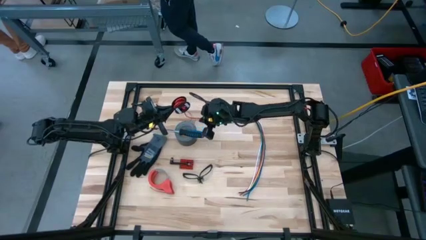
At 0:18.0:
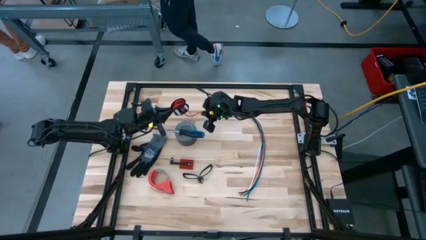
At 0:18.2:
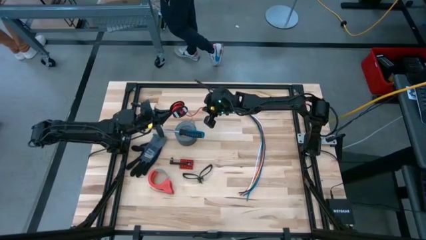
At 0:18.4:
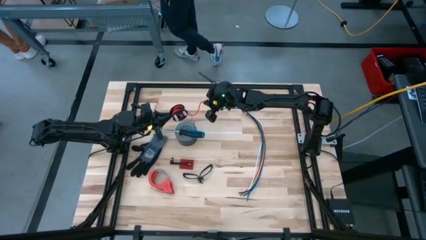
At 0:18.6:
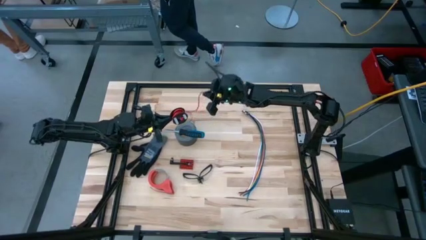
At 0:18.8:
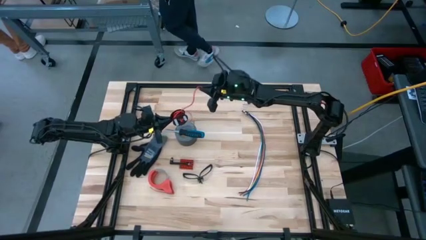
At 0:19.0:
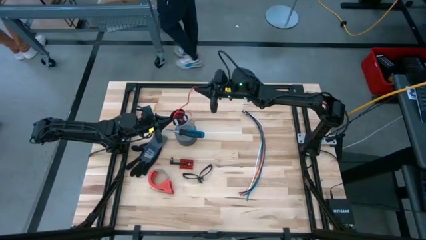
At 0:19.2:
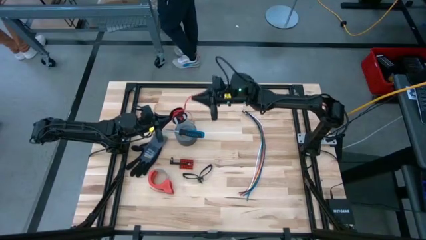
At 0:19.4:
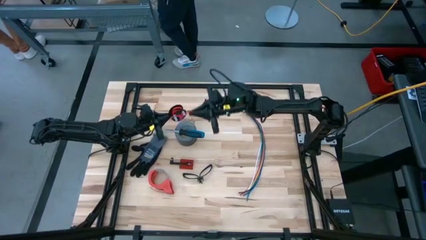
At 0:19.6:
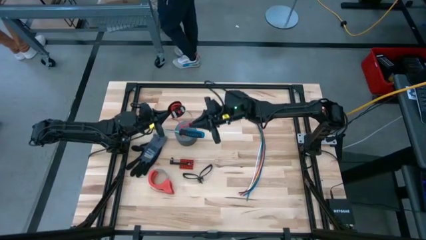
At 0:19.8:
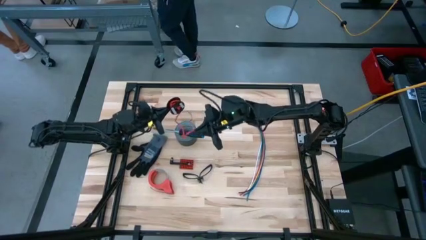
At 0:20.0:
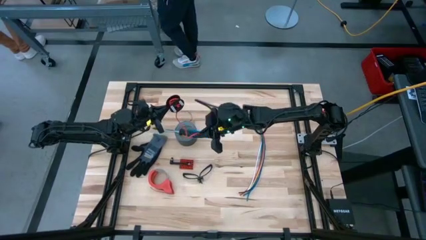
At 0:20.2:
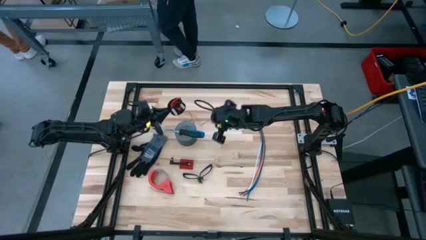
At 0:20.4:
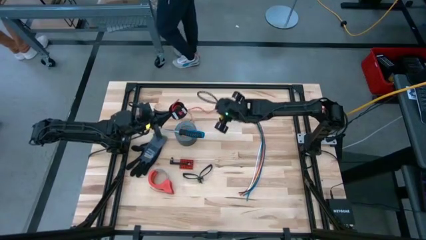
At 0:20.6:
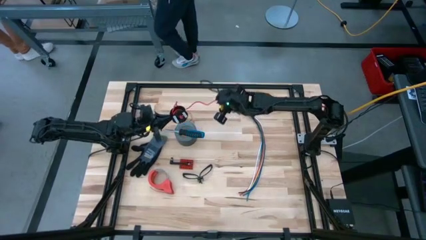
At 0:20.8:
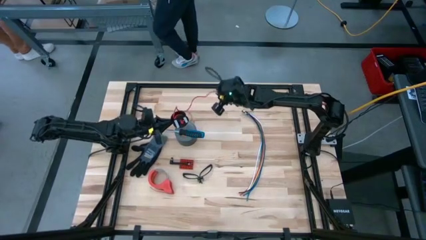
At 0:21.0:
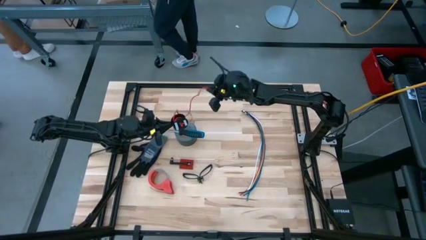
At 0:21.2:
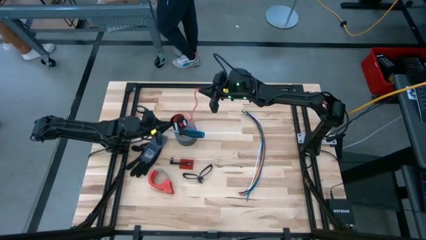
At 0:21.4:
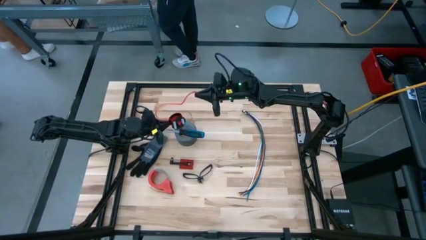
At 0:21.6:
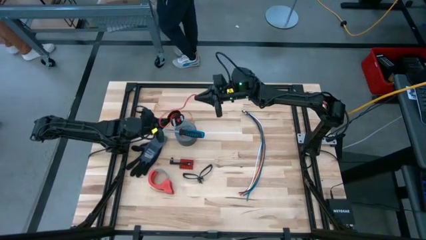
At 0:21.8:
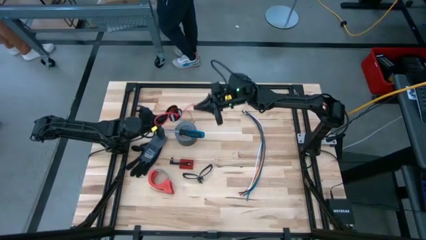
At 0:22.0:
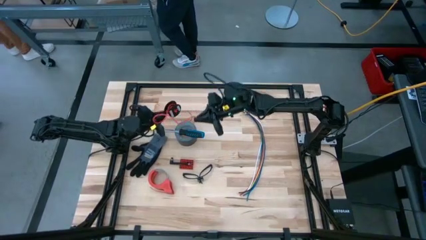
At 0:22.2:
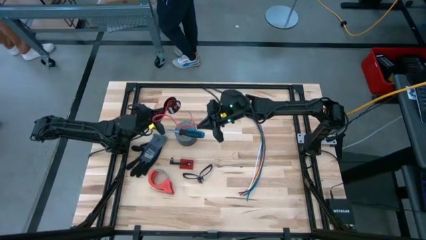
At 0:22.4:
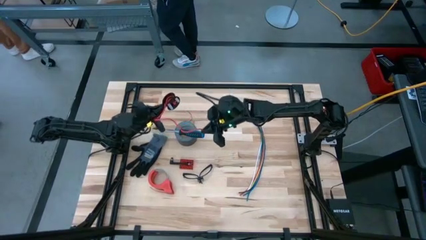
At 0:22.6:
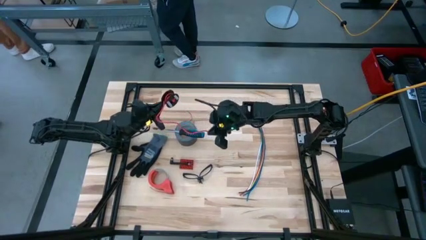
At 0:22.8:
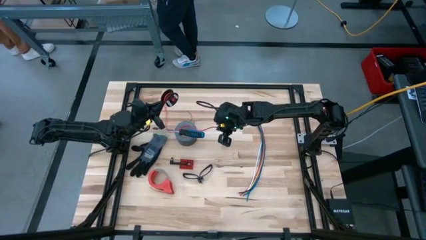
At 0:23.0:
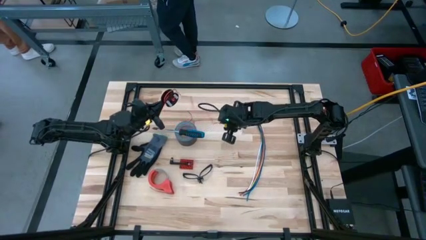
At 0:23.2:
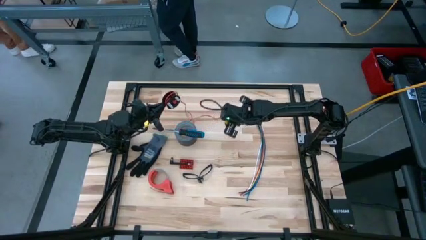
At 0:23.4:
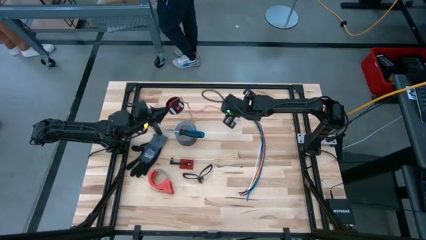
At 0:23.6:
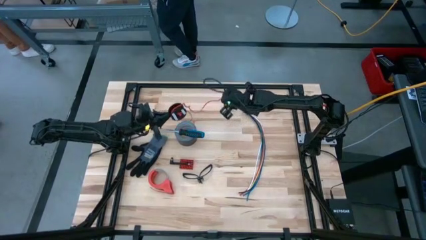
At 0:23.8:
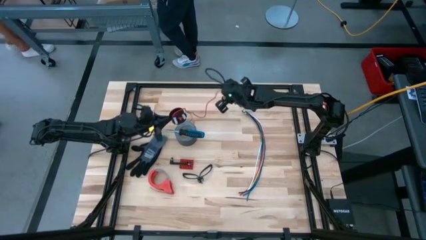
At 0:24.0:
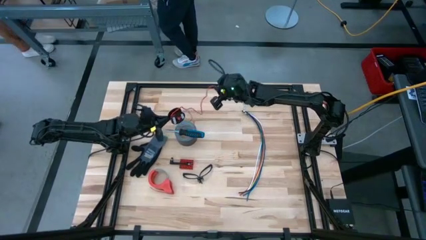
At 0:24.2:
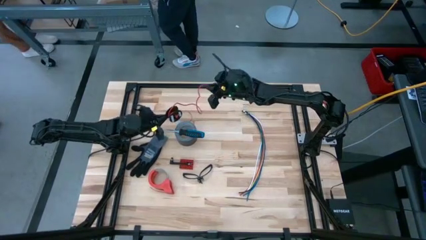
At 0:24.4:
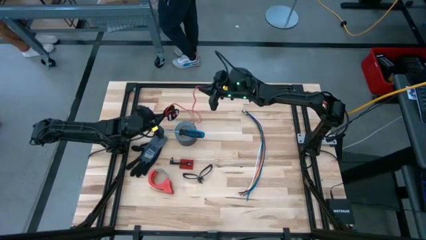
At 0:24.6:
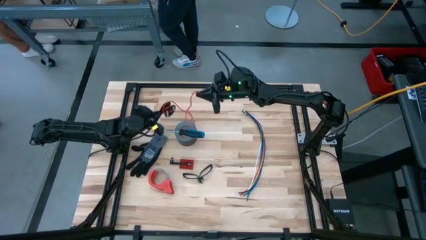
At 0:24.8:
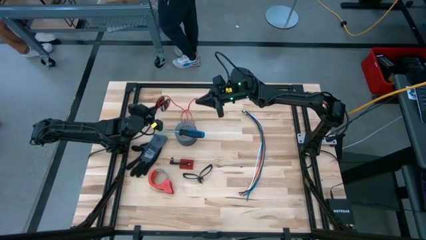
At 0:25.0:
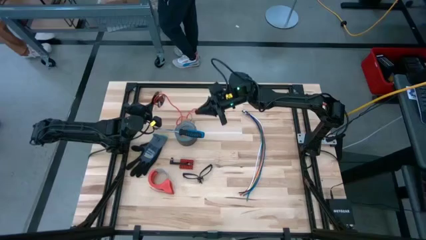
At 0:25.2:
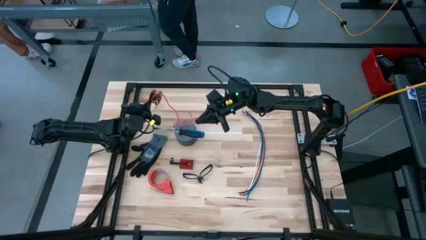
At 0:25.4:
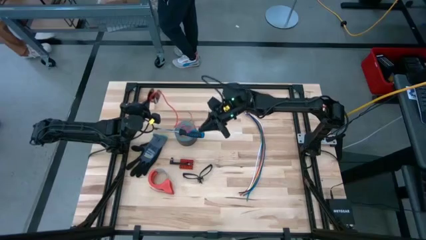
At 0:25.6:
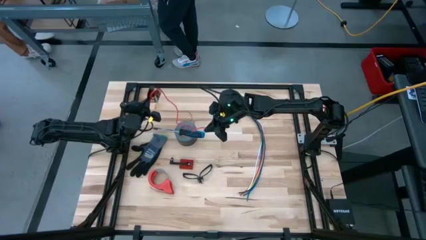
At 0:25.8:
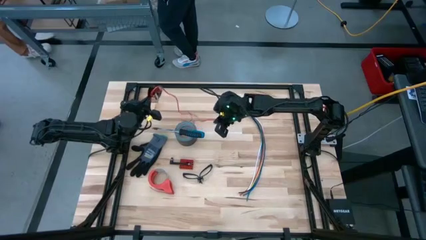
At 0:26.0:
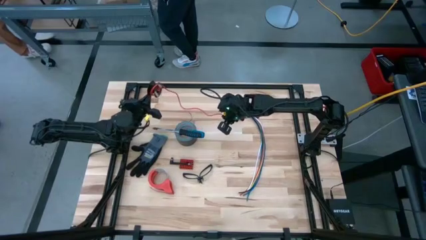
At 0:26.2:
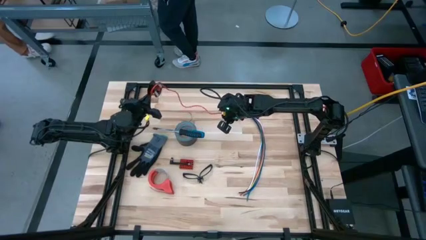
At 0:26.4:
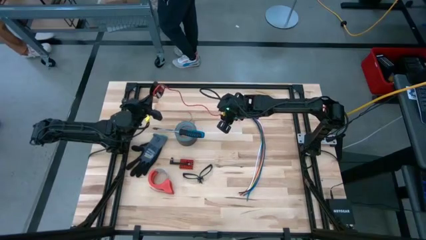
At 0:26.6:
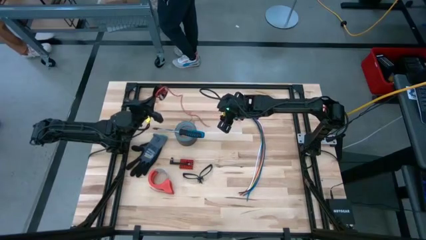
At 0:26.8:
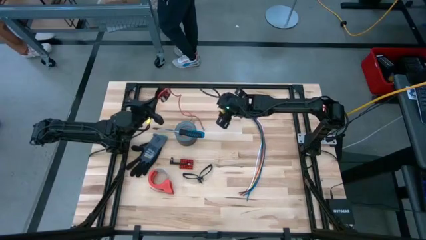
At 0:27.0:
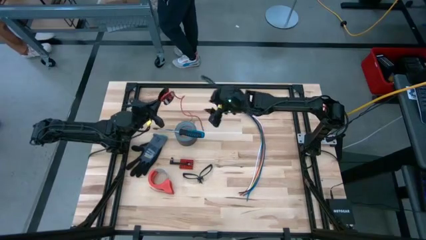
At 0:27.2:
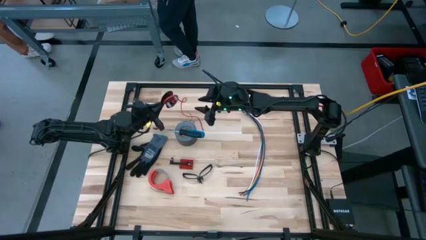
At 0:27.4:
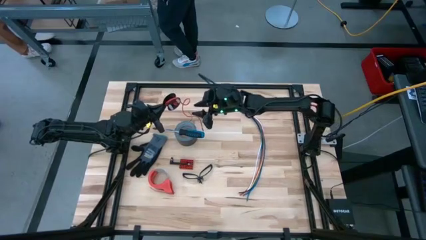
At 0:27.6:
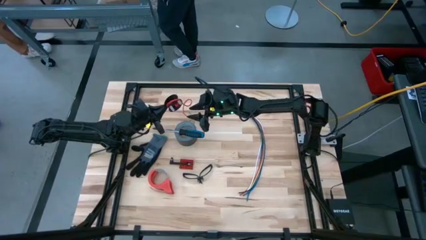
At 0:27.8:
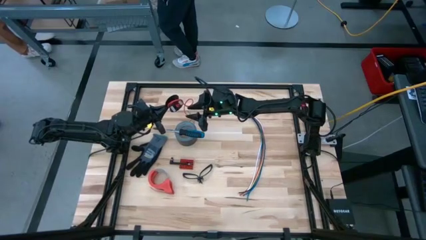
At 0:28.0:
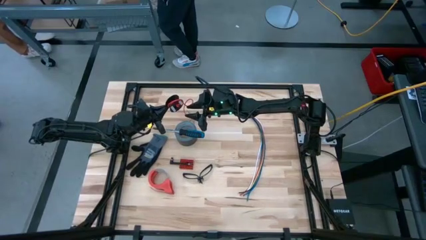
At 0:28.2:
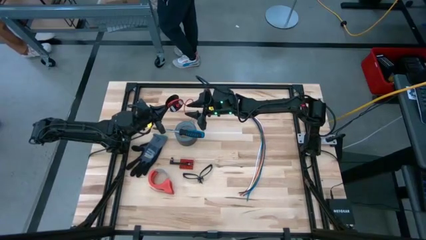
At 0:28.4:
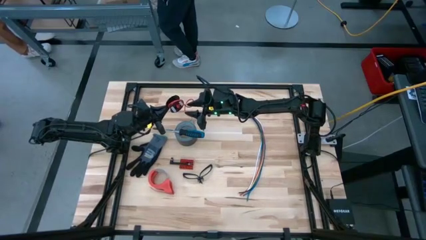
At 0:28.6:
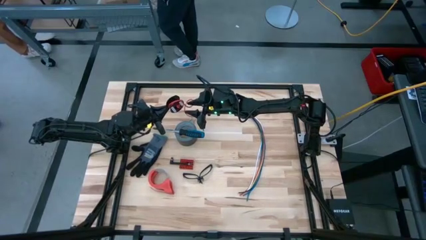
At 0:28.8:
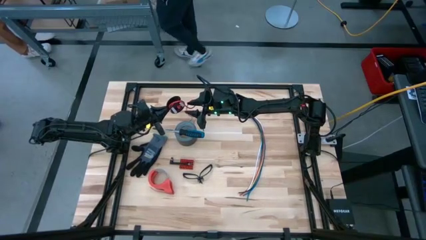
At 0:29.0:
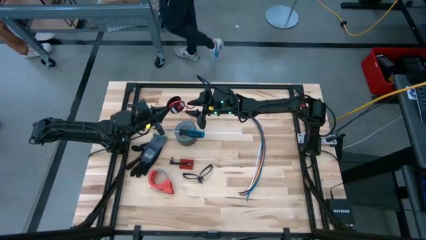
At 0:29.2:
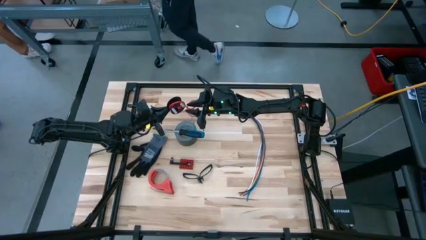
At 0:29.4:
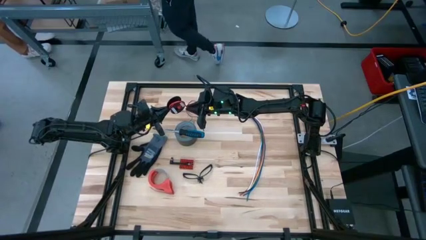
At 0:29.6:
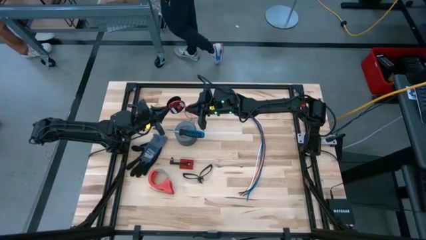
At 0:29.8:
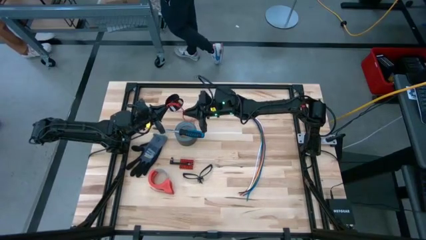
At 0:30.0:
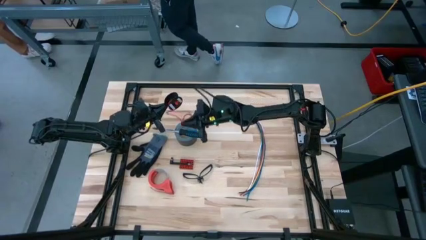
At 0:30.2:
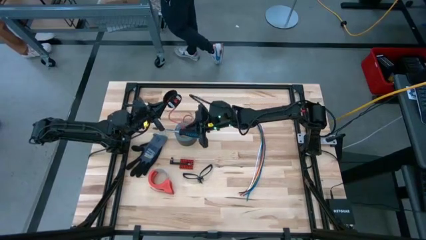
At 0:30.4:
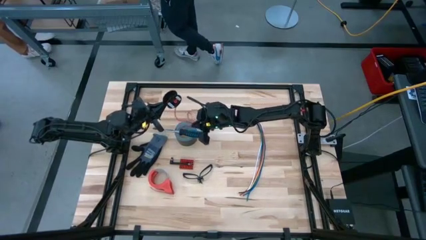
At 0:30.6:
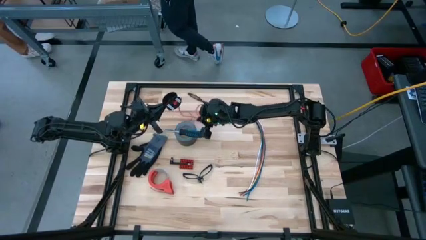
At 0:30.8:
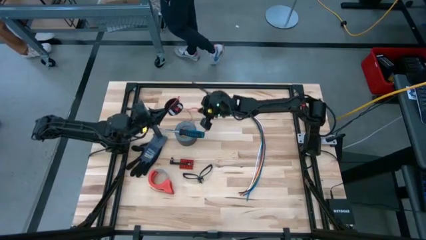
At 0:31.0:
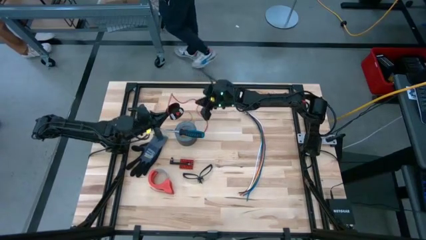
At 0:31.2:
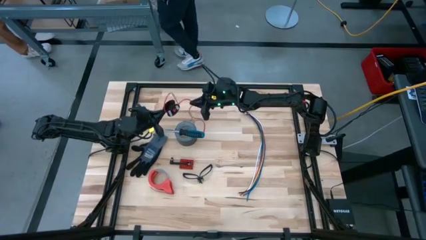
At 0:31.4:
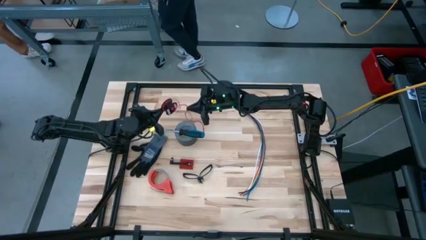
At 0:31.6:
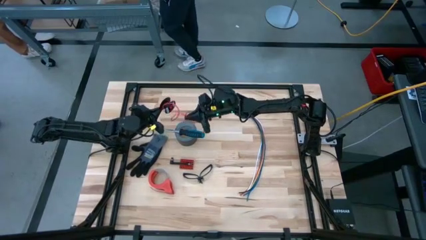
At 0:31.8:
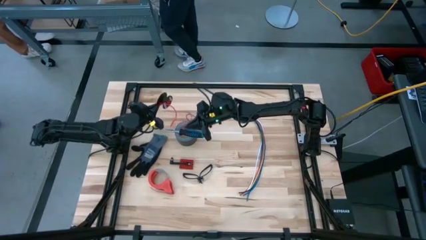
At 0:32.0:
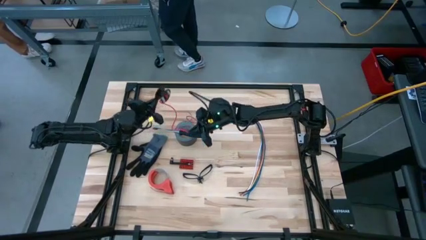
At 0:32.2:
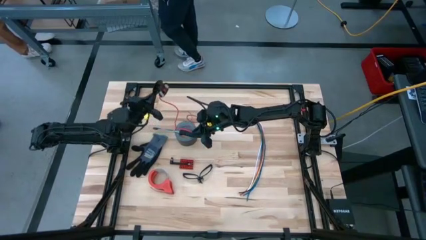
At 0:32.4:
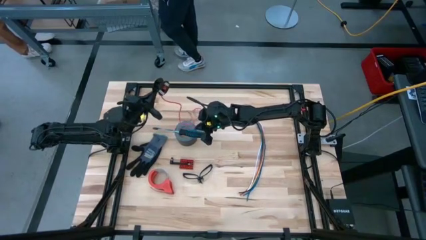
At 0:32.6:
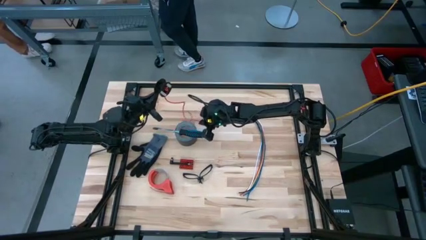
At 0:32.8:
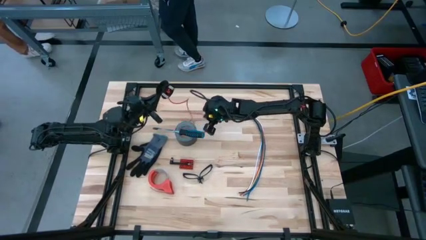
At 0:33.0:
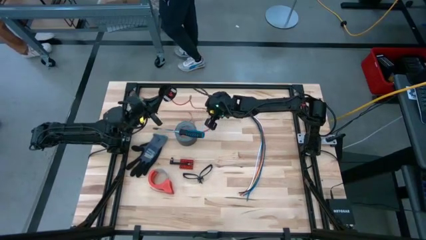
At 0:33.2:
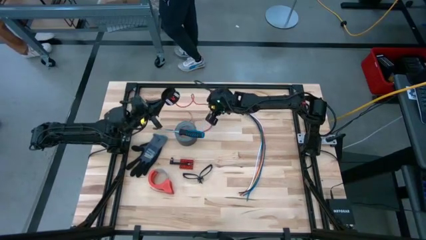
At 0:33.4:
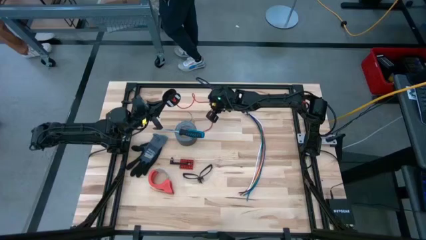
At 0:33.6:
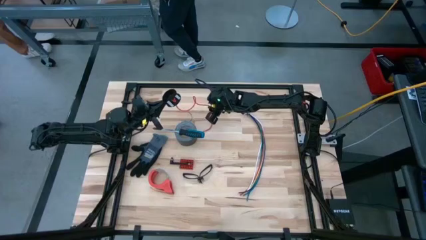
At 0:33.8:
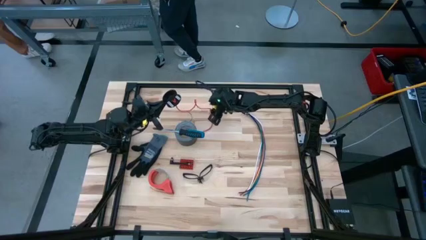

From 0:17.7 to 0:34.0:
Task: Coil cords
Uncoil the red wire from the black spool
